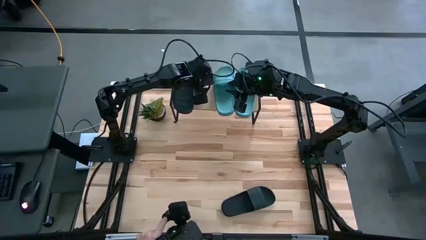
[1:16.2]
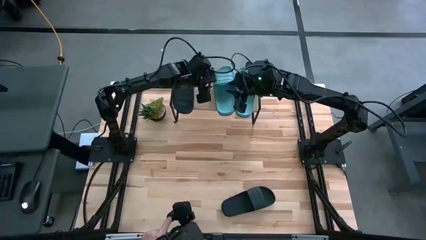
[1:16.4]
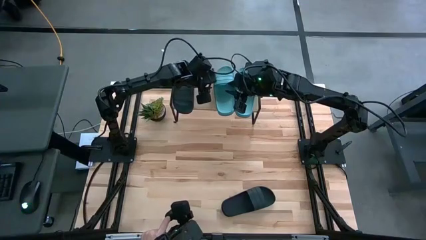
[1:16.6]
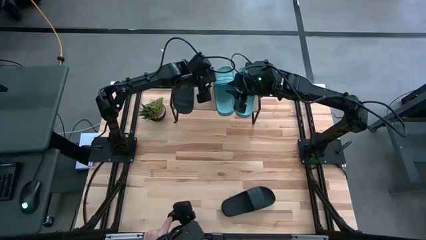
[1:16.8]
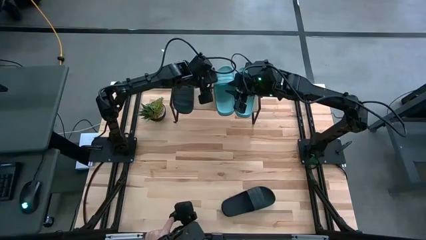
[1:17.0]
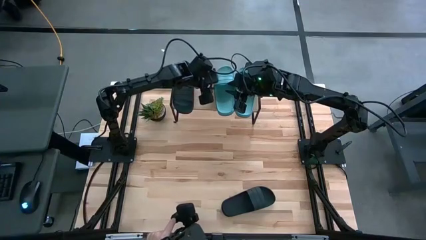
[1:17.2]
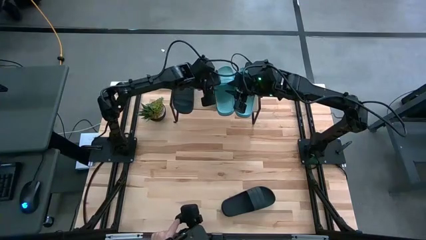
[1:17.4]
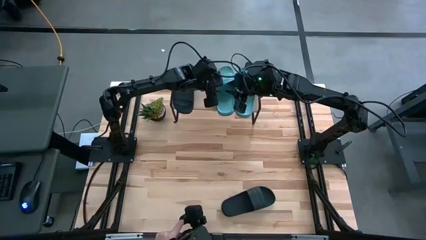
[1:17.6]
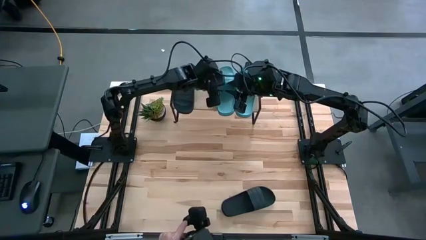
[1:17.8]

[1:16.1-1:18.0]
Task: Pick and place slides into the shelf
Adjust the left green slide on the shelf

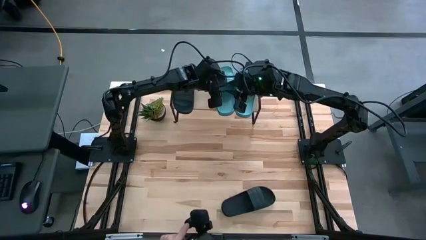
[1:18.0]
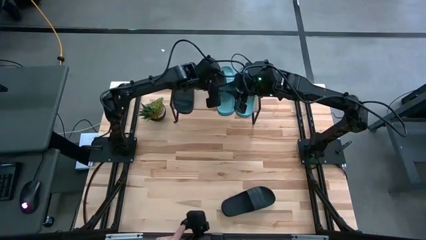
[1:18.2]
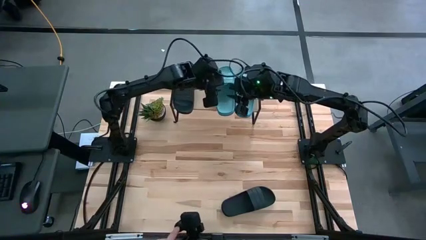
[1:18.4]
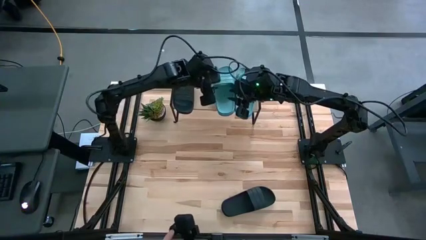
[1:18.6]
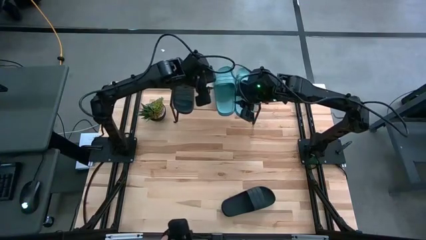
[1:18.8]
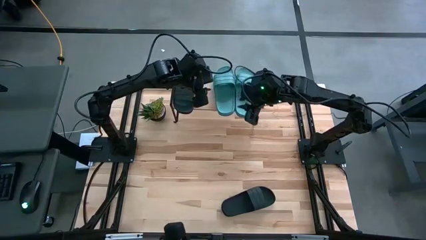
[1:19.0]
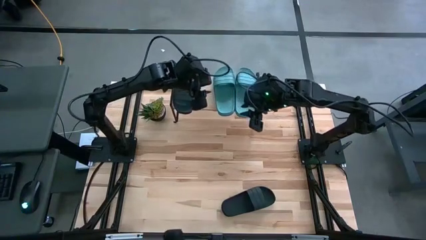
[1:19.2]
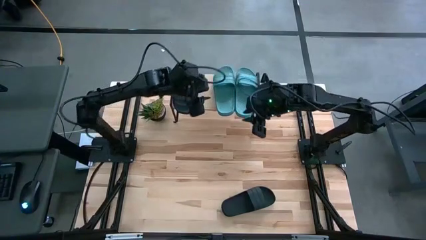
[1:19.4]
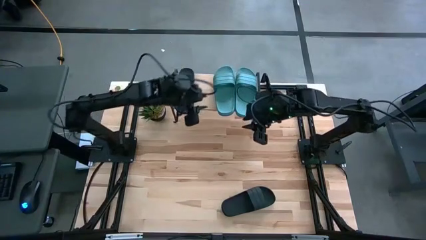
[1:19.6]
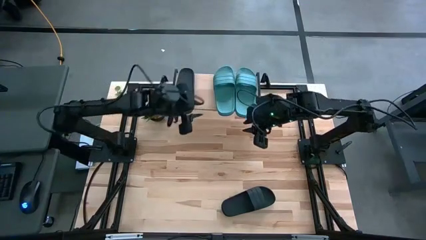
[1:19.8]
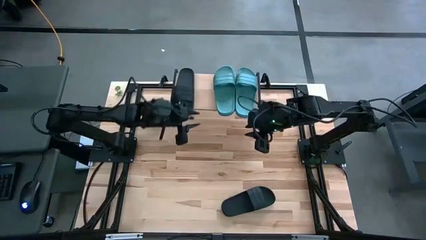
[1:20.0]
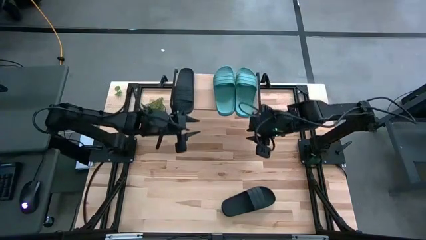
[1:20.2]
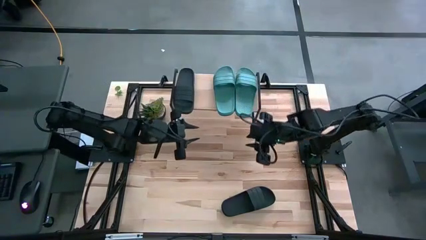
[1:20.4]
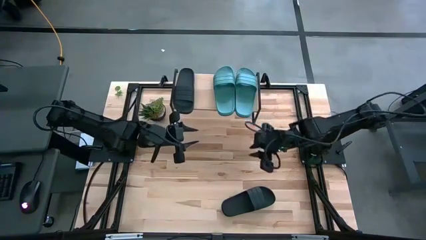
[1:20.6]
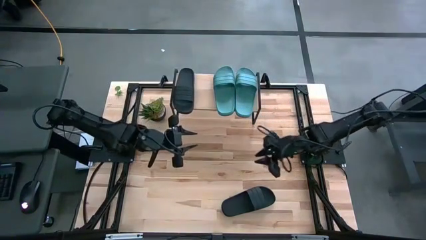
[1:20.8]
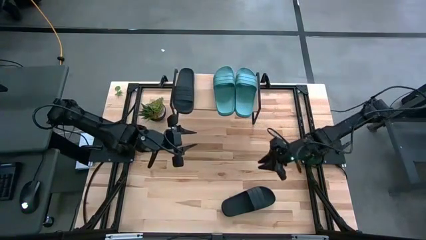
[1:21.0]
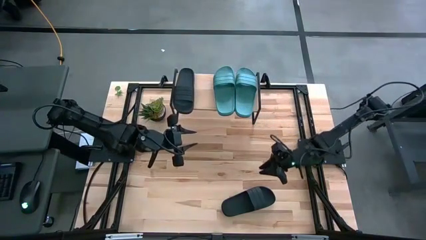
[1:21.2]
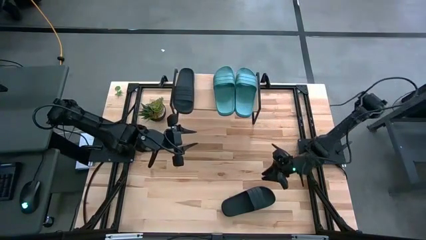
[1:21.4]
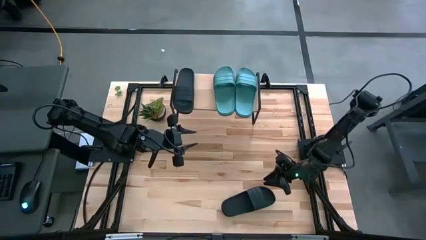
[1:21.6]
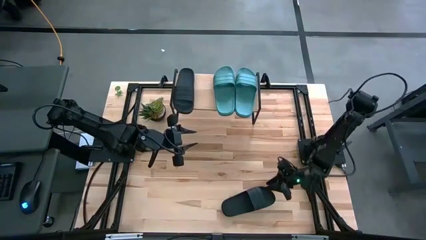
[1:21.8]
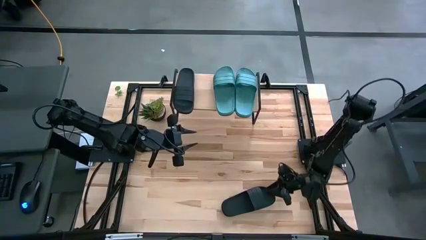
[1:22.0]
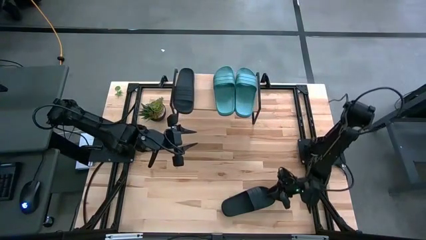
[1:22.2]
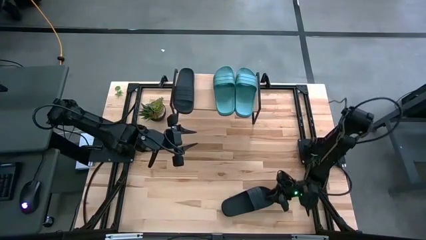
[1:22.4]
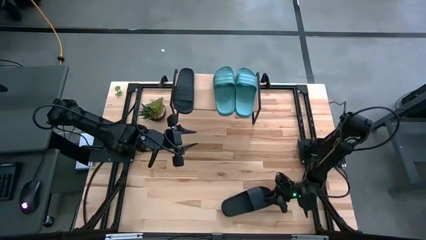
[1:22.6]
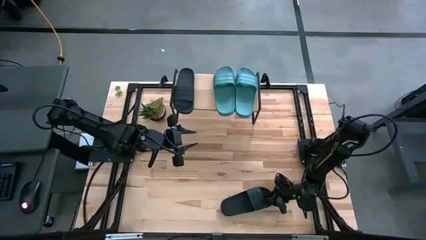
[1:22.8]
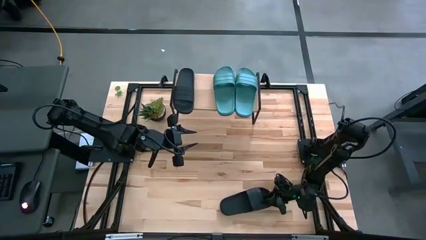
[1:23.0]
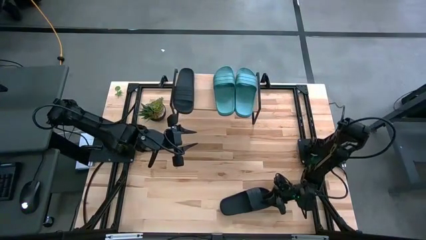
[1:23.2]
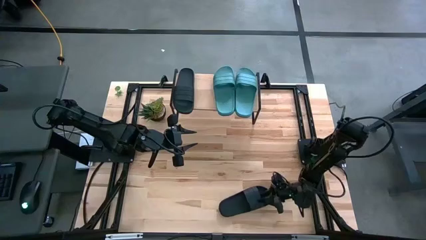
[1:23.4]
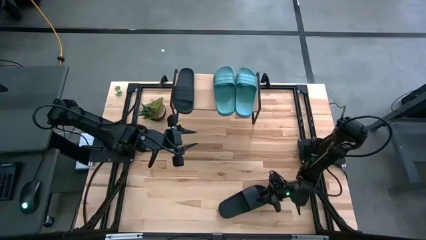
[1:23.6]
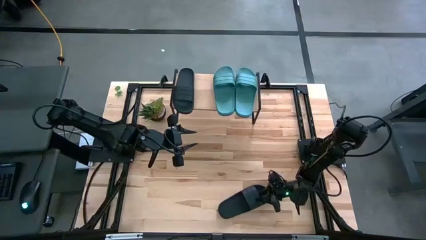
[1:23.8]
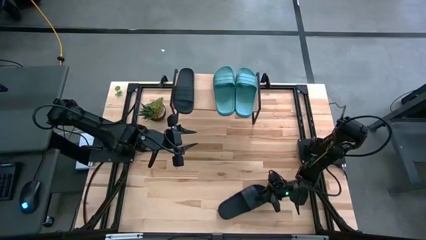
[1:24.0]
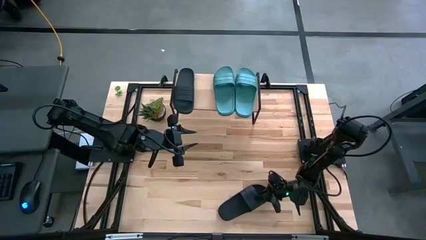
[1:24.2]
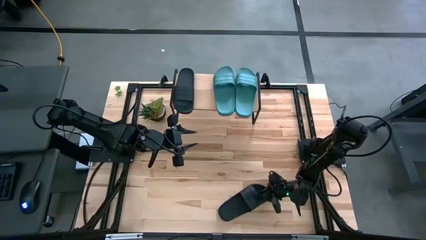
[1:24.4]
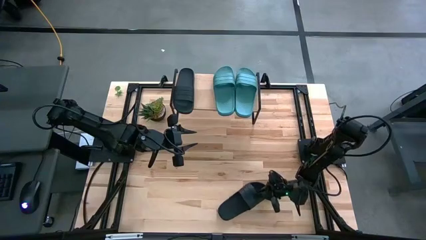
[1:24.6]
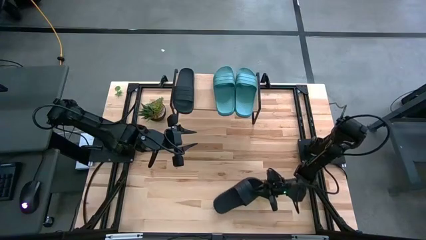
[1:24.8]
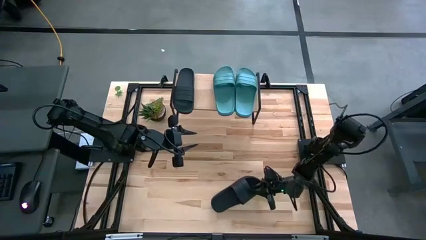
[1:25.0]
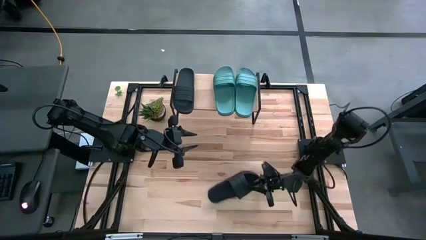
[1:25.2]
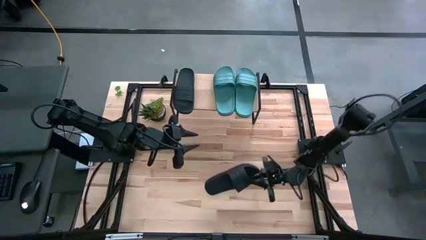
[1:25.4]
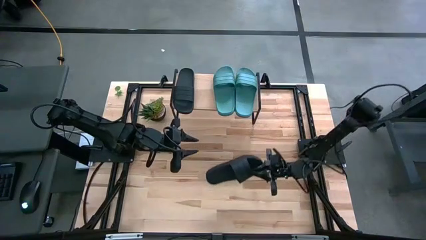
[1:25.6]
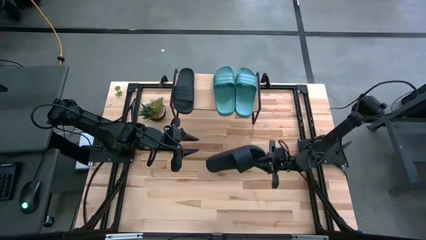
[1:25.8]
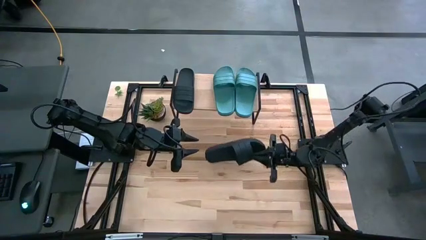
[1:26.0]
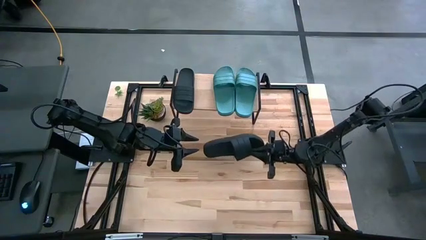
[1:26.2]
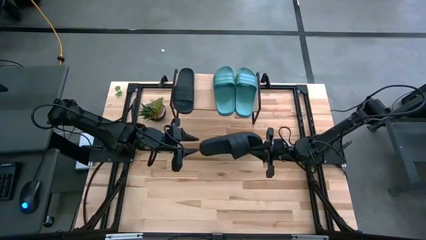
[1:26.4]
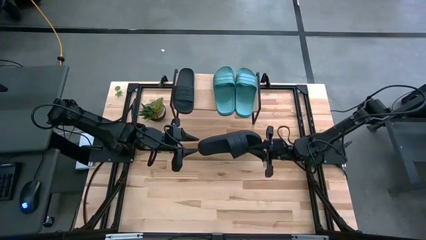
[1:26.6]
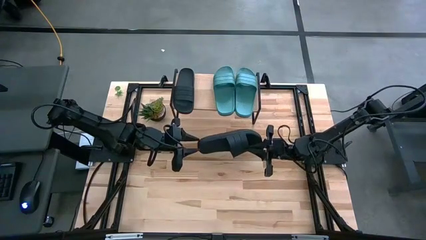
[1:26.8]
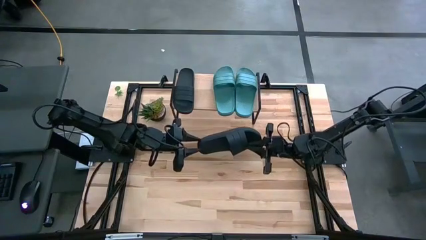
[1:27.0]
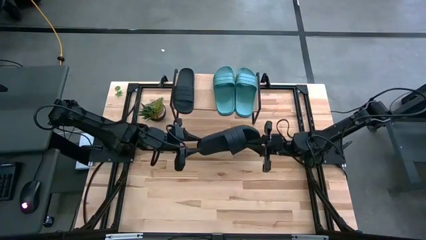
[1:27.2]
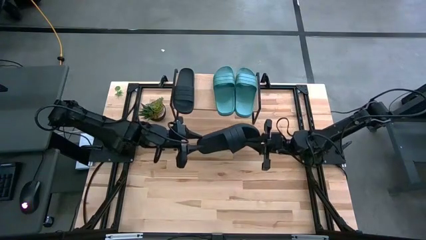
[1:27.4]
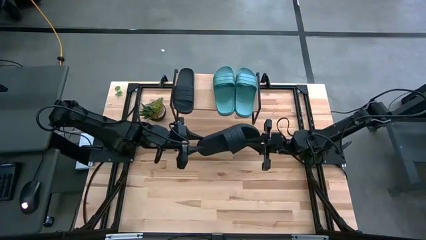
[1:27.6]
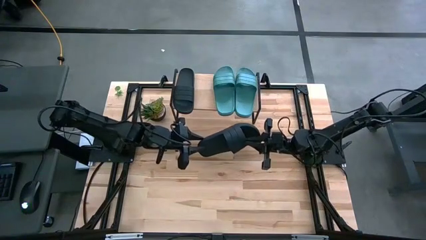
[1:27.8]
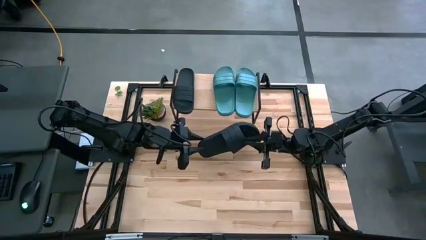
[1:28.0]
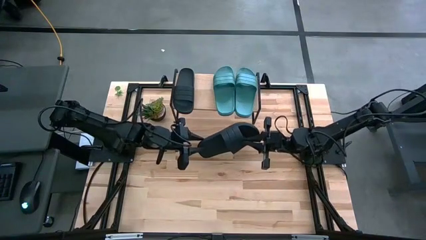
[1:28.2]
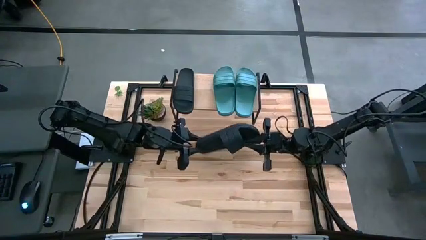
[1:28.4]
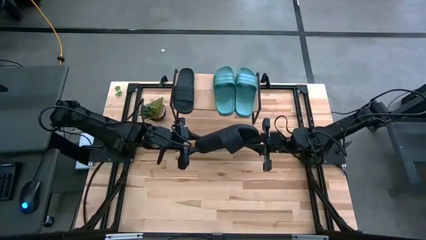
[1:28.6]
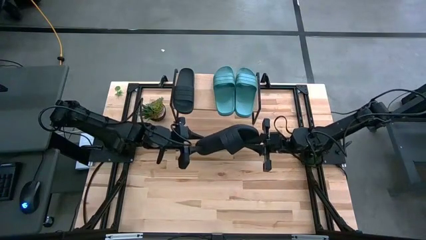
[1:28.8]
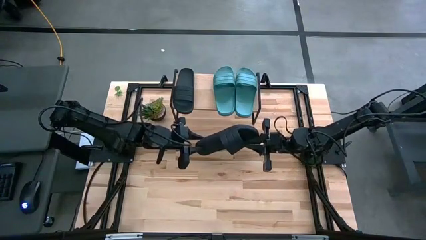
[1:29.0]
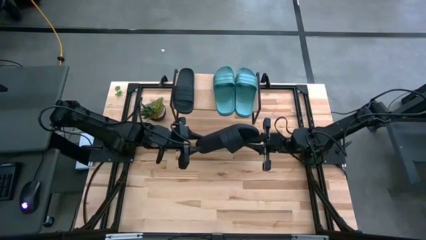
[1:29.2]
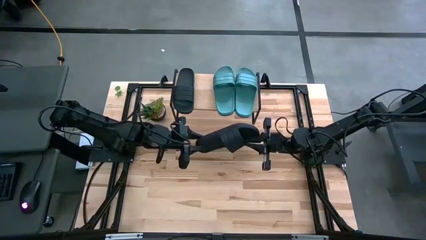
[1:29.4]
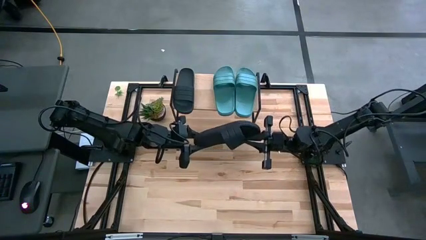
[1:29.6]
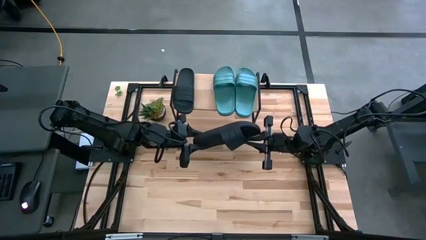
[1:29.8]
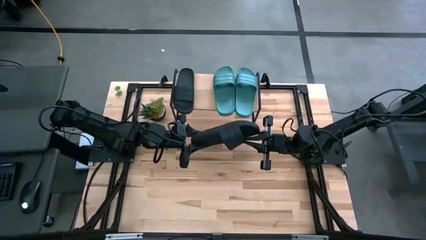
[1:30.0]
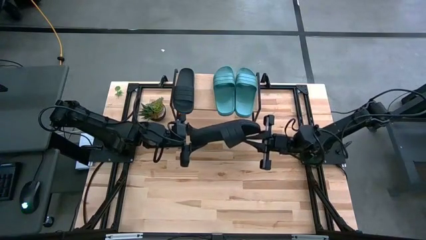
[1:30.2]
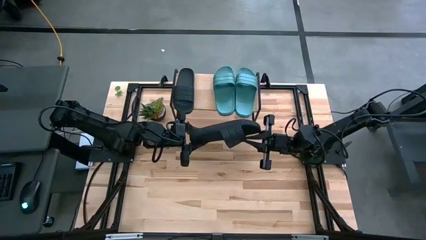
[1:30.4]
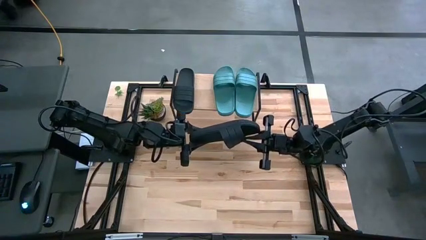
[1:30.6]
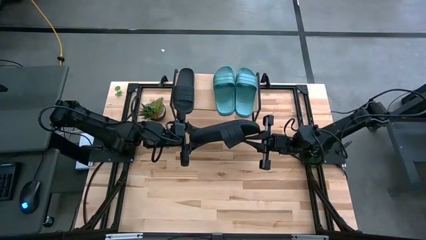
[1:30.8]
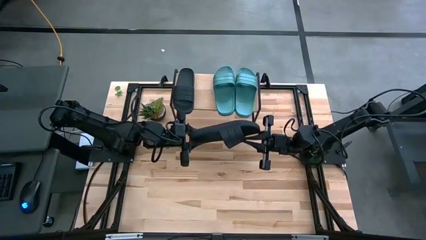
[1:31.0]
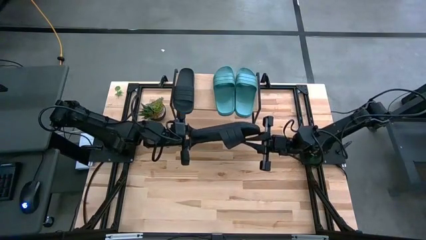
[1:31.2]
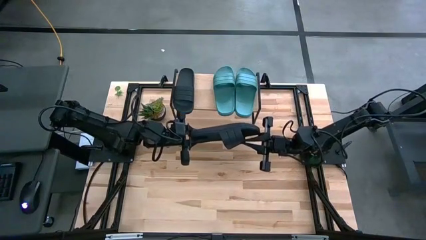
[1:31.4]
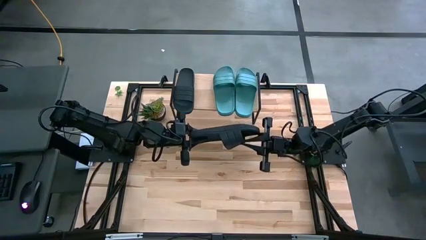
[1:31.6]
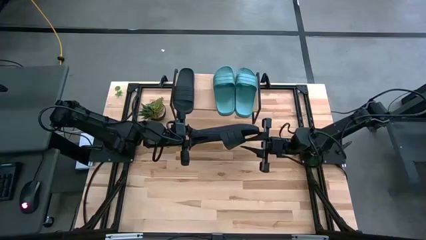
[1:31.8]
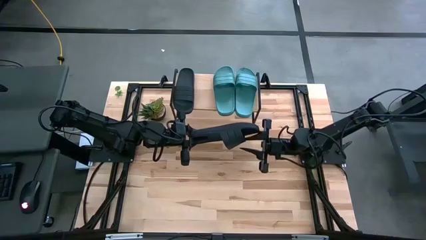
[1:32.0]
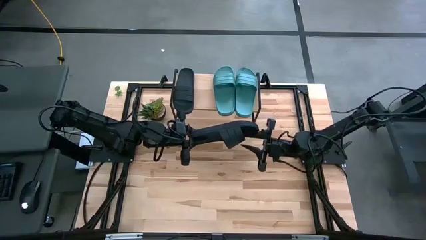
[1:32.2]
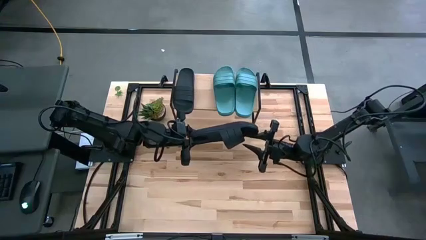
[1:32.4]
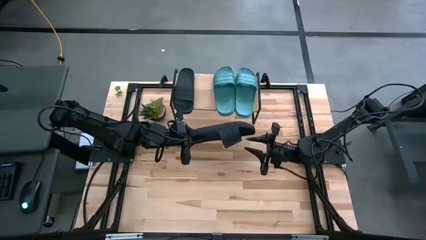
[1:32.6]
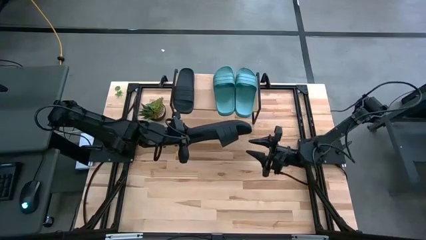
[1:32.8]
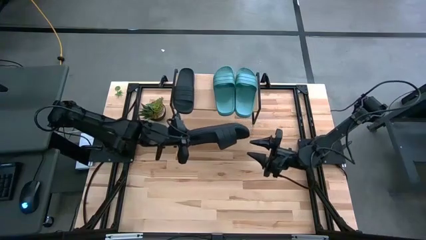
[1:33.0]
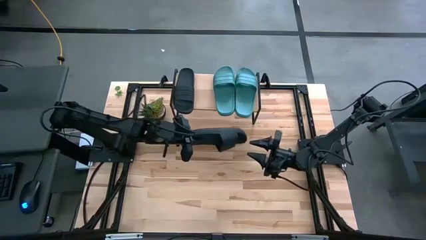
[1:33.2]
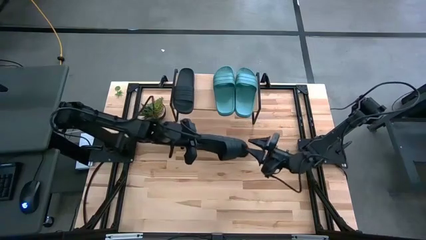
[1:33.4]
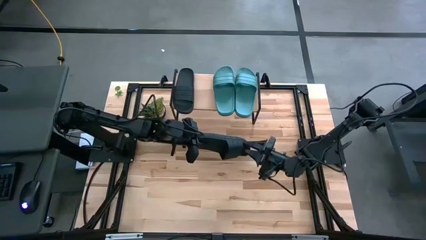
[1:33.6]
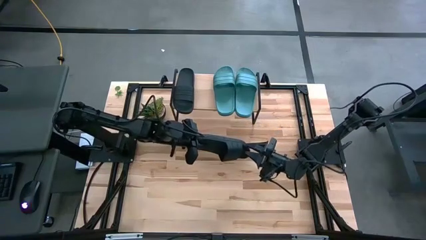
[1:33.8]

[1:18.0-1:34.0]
Put the black slide on the shelf
